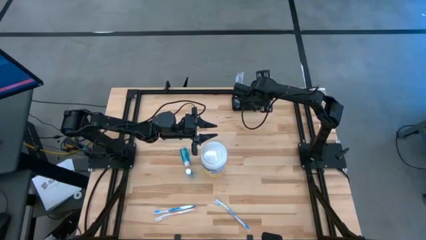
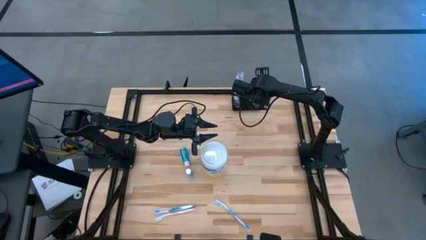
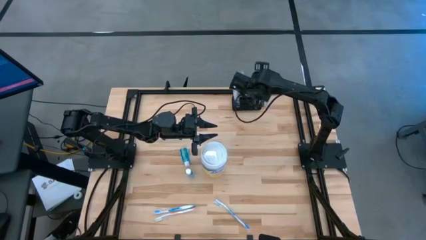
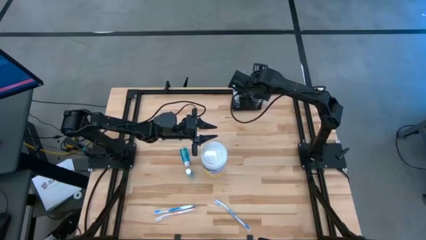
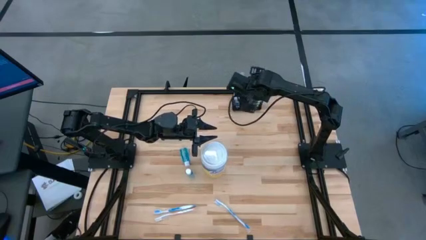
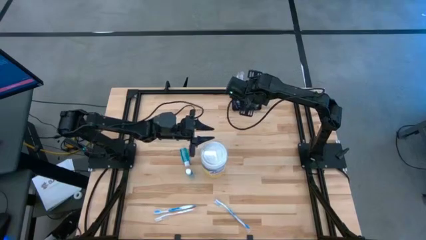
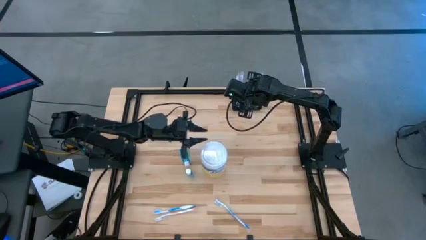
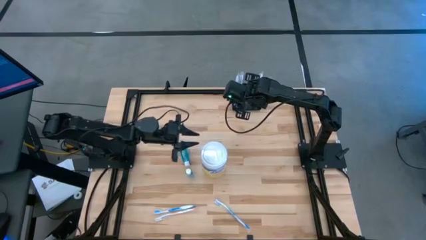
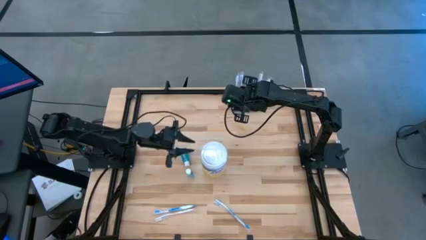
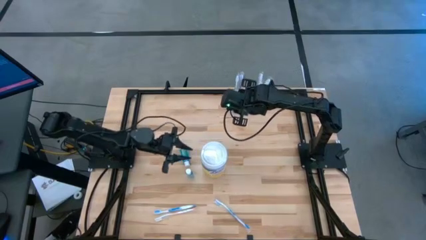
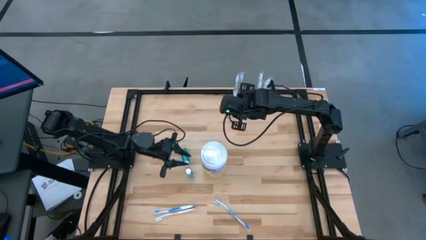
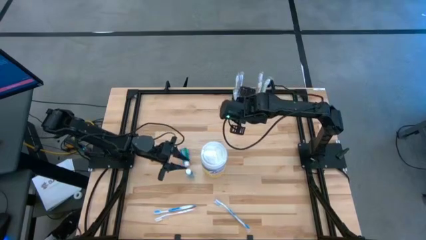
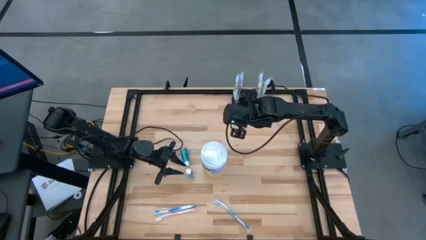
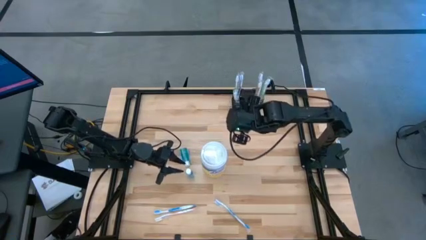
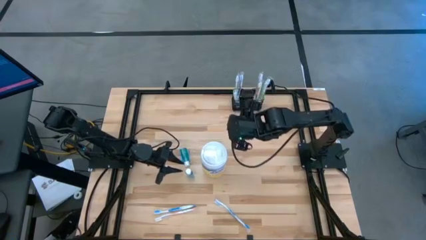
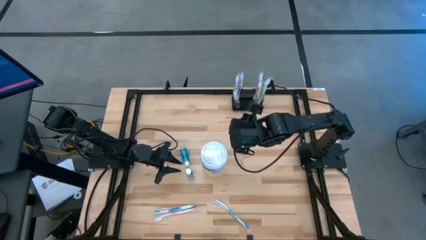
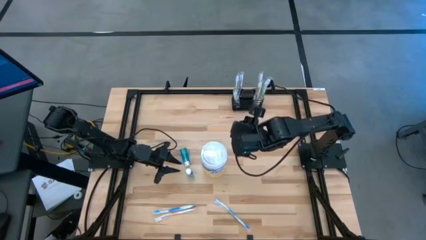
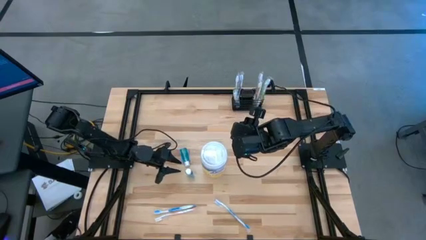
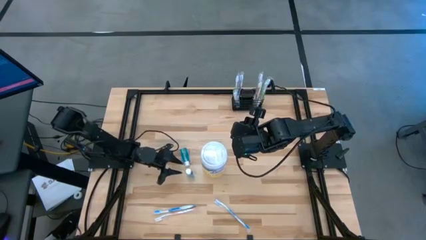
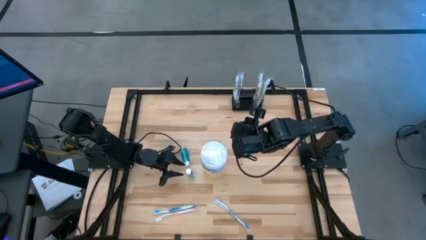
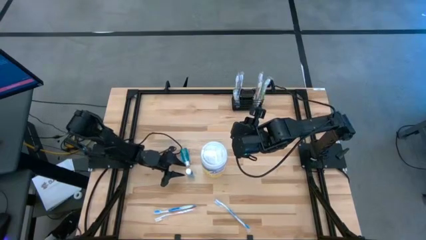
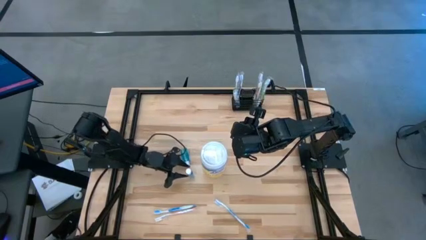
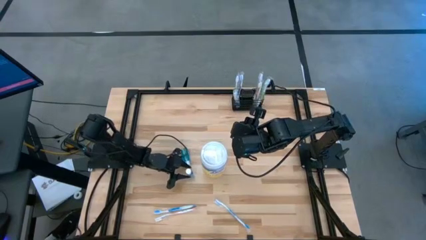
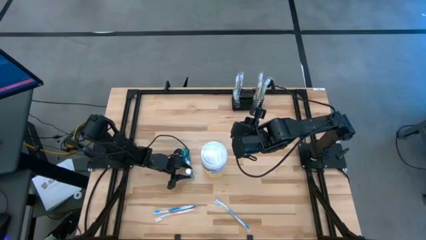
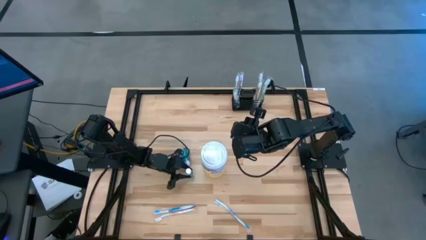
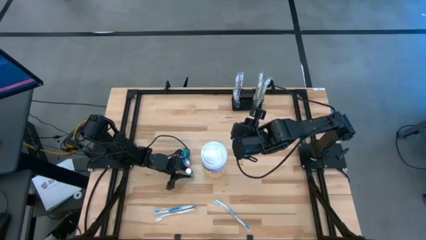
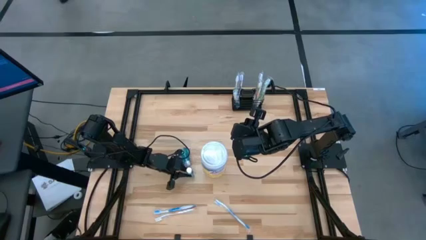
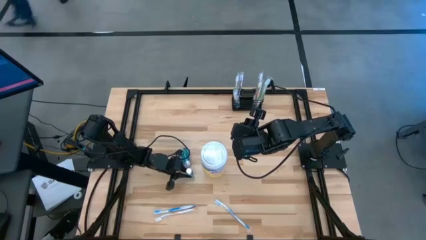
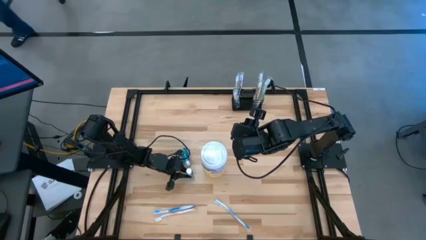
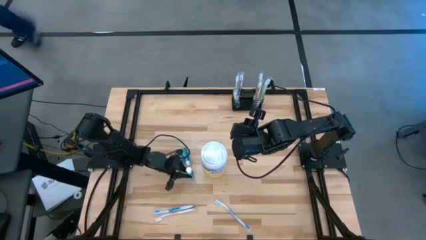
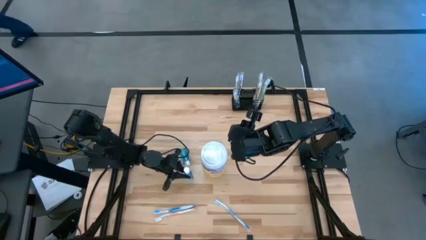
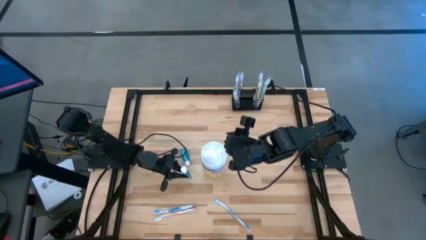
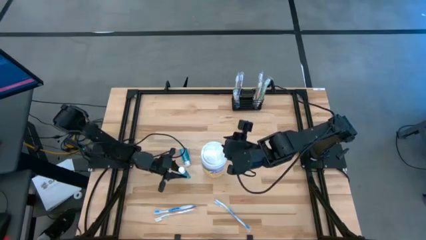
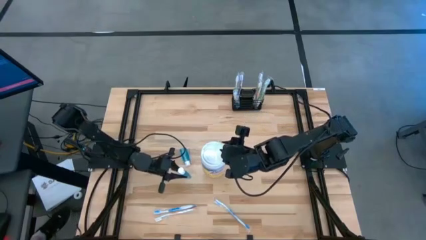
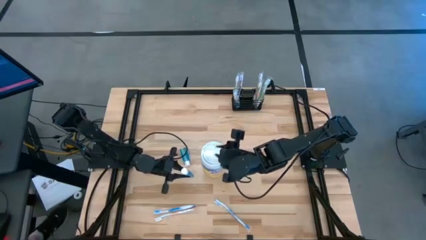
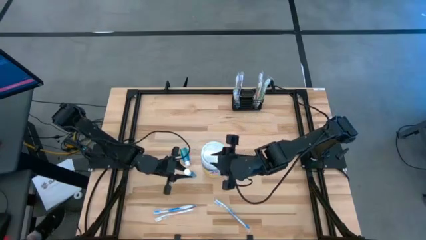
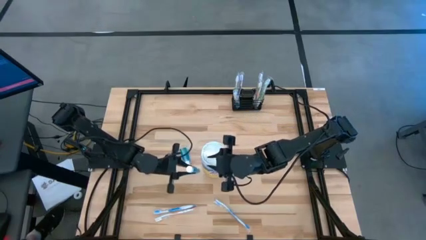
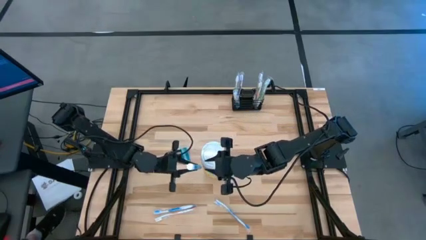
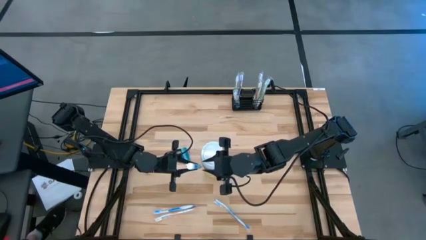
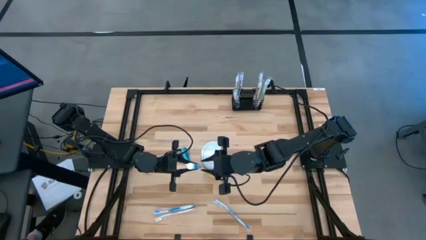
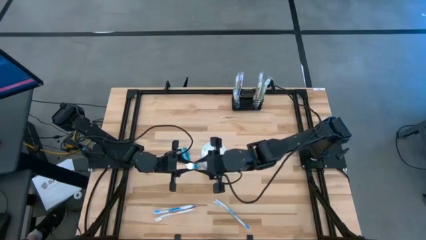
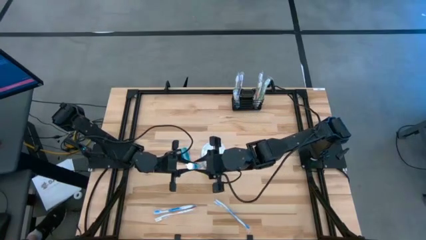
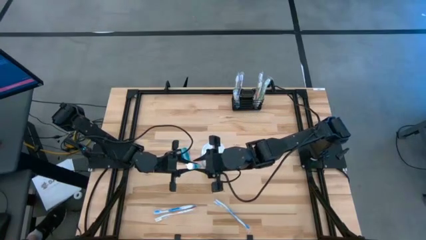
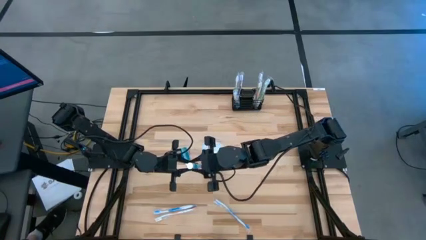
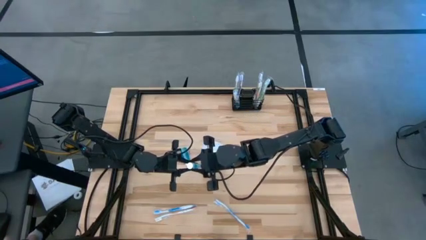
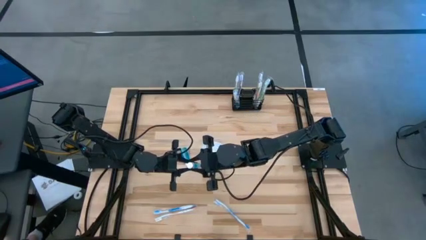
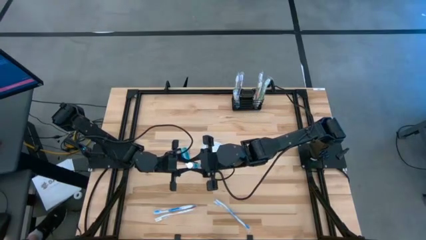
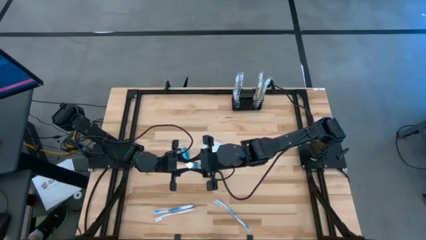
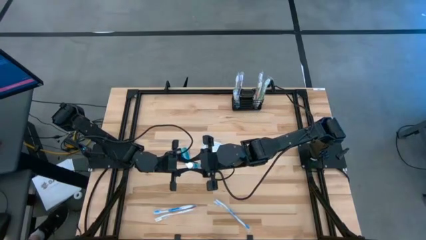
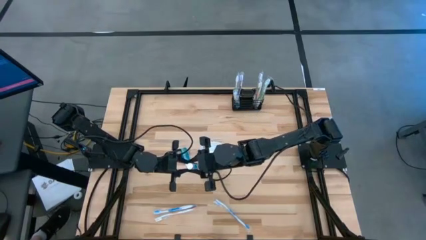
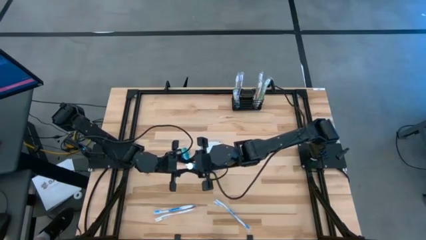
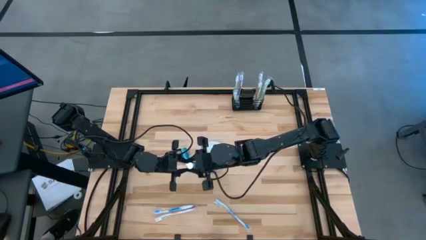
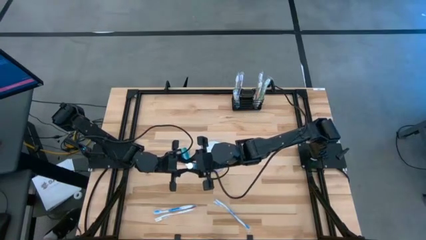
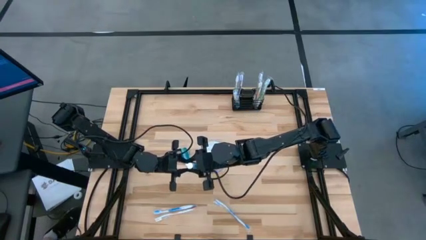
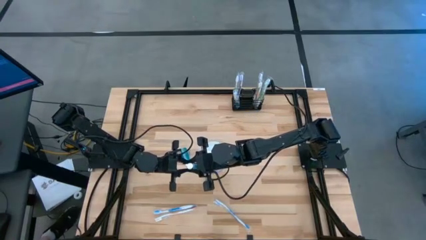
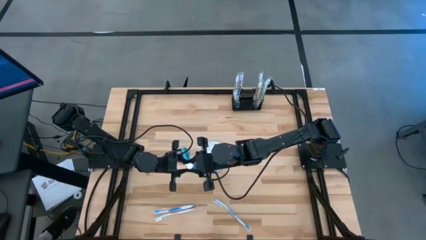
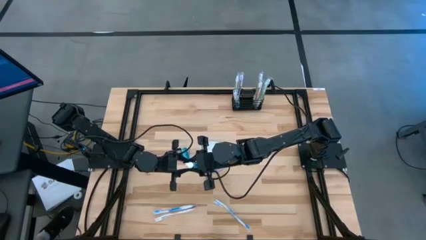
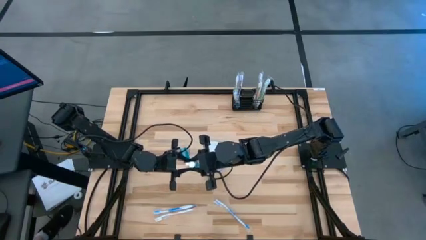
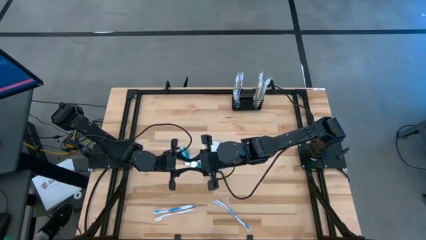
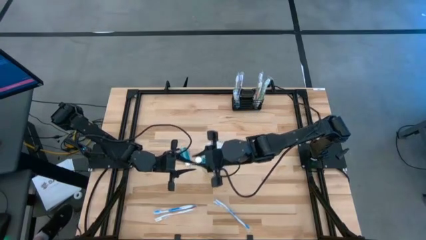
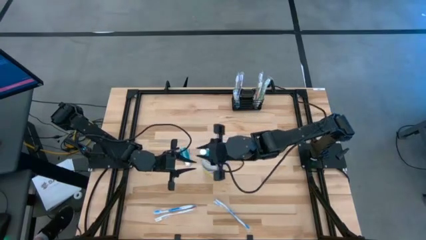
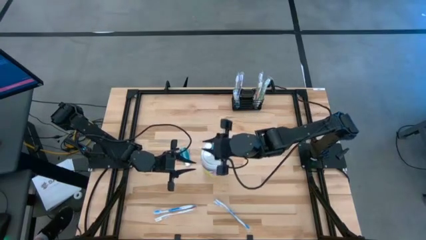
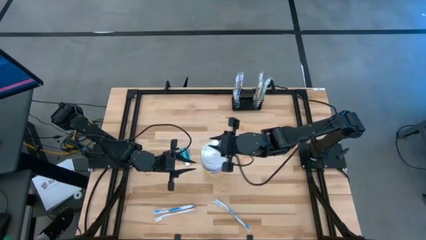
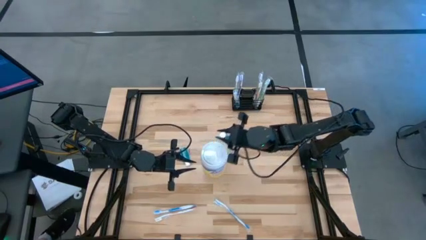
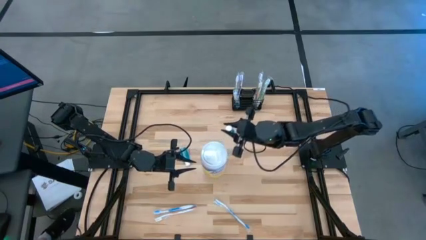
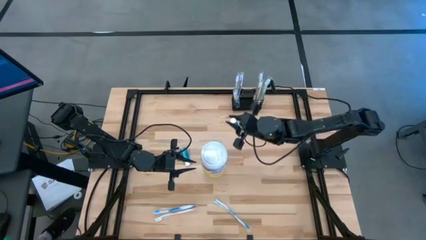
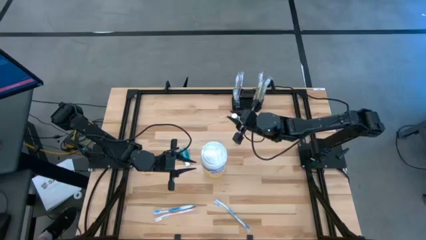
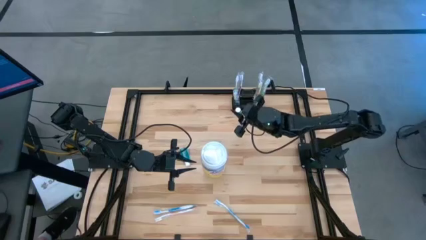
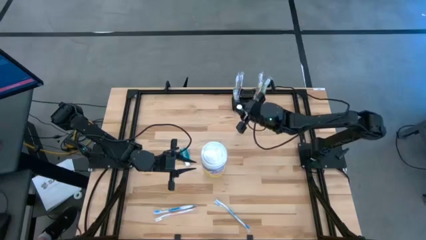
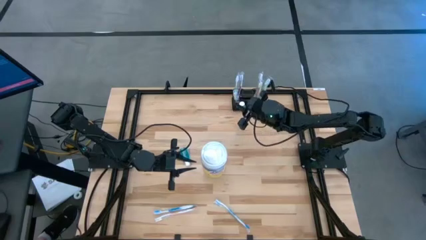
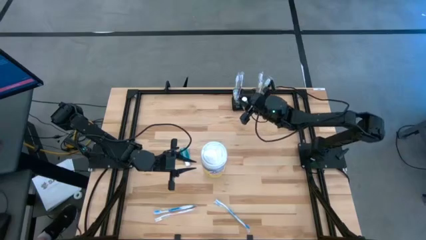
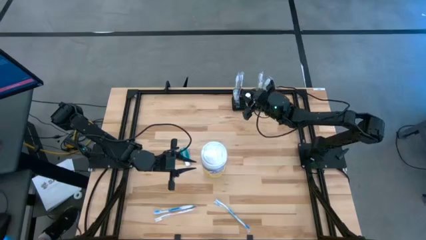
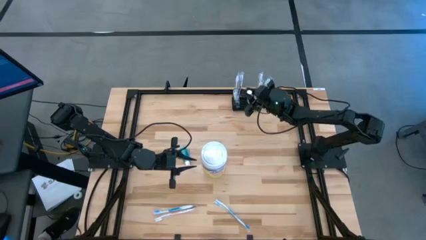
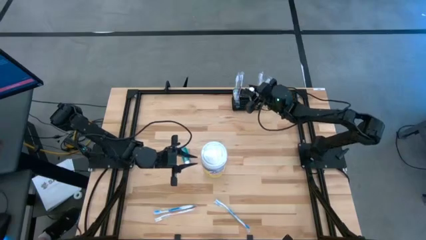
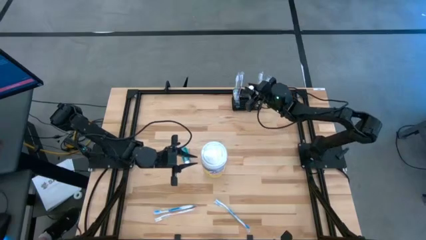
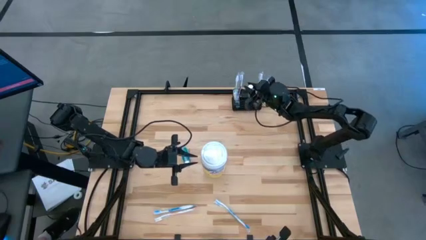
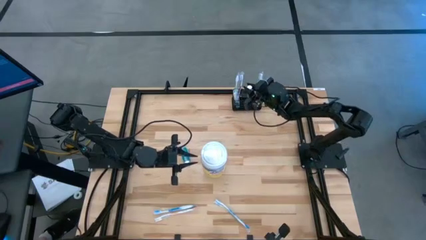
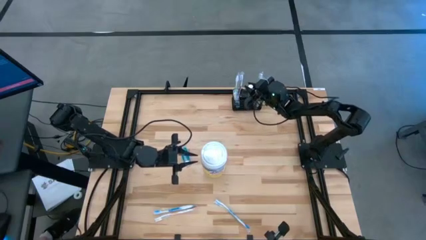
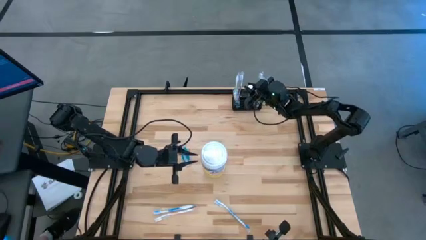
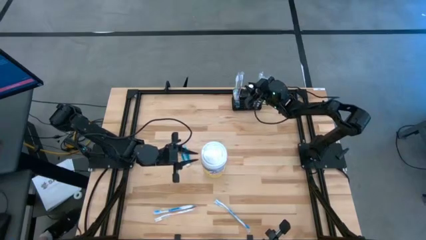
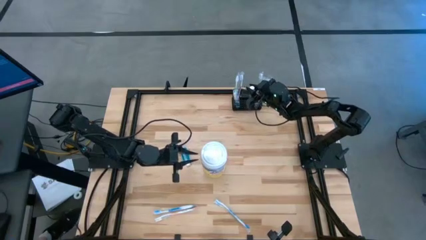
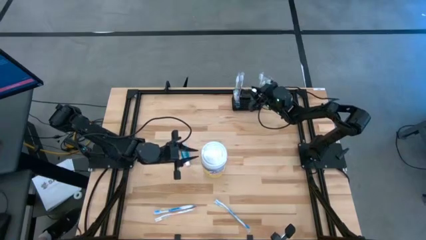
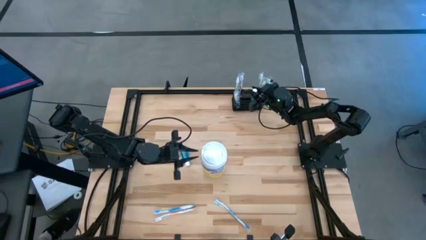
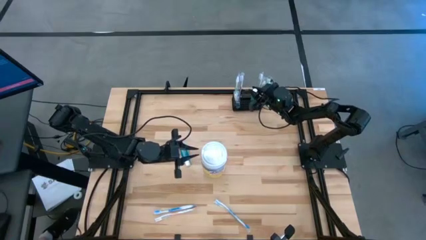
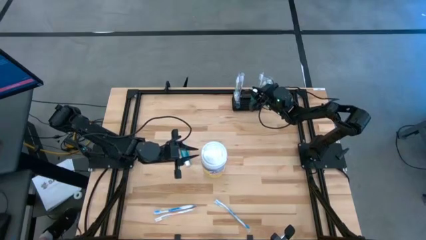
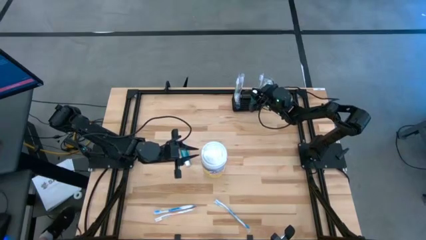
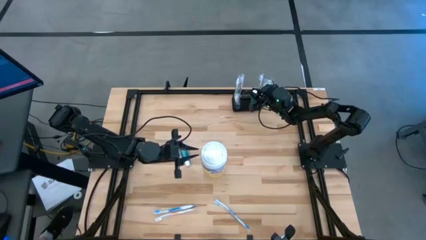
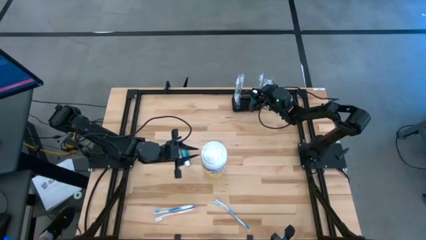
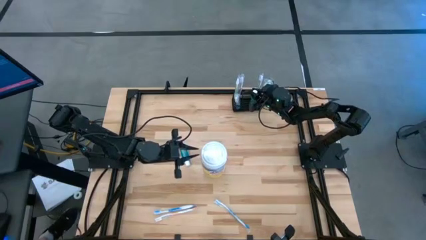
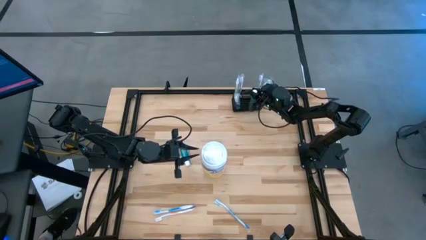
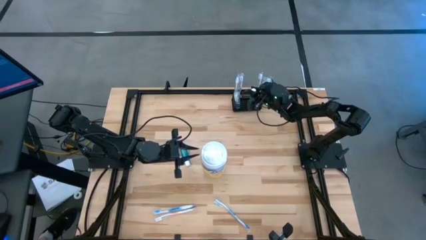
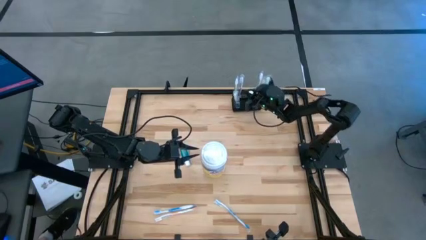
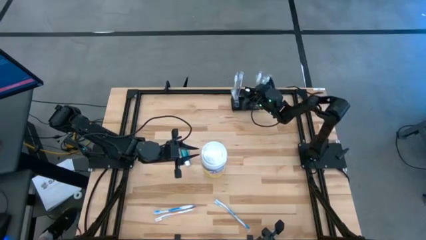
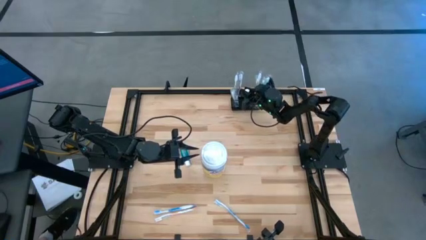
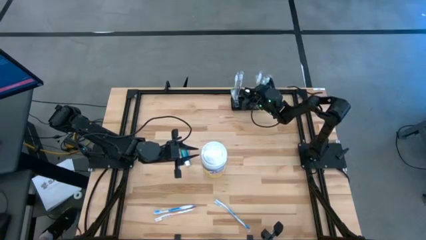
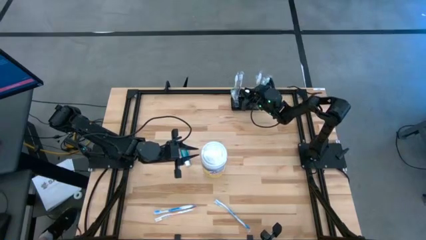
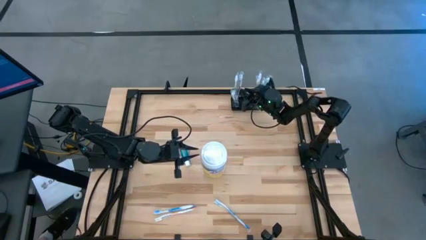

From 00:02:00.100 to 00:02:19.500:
Task: Pick & Place toothbrushing station
Put the bottom blue mouthwash into the black mesh organizer
